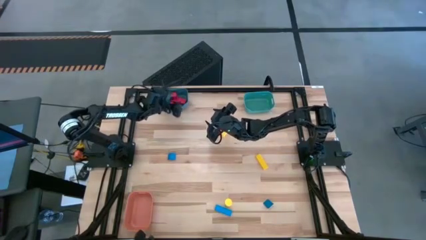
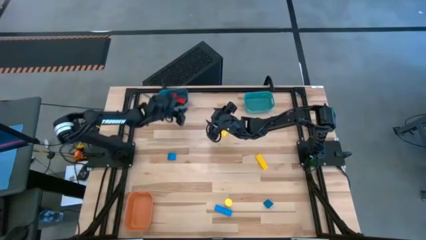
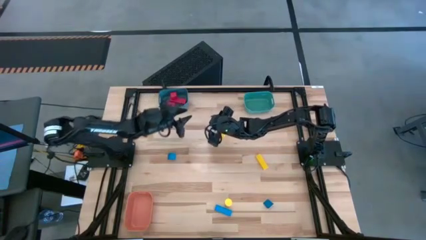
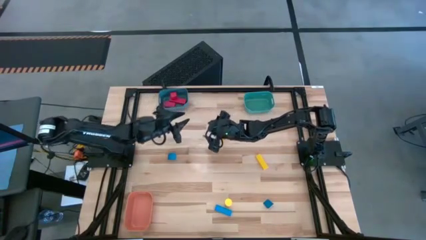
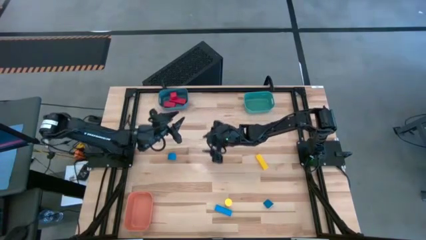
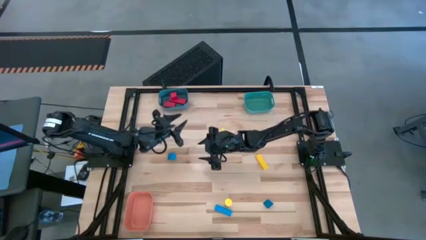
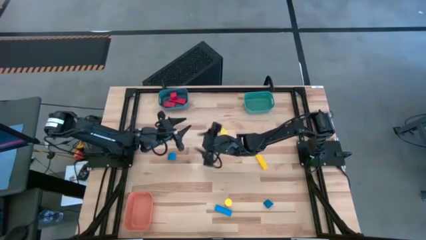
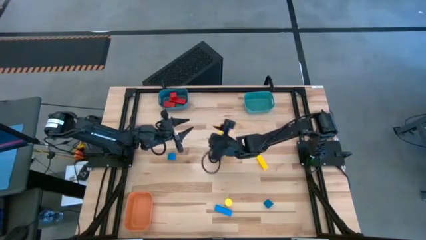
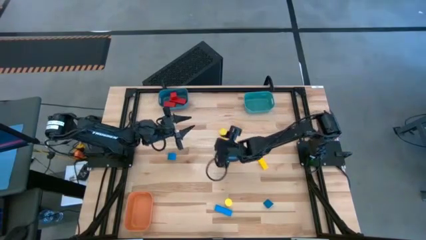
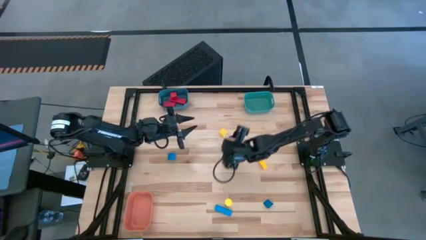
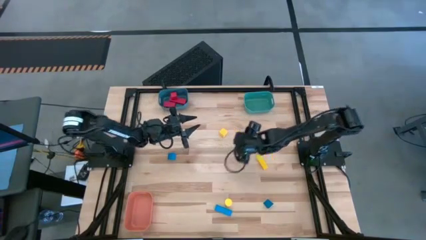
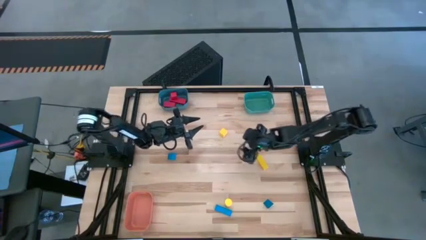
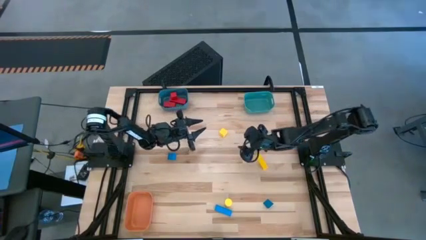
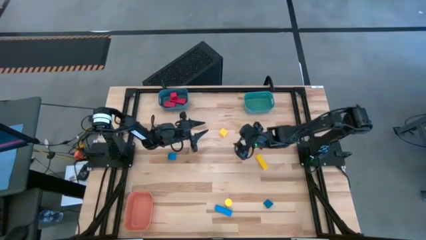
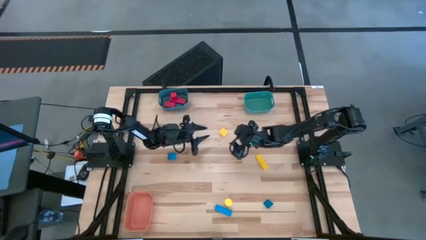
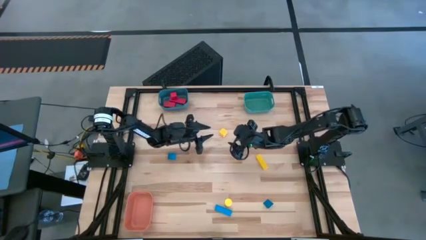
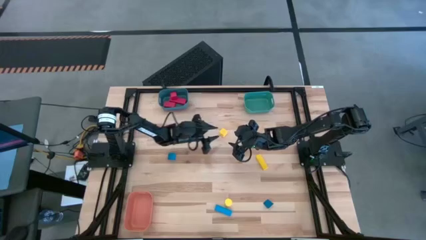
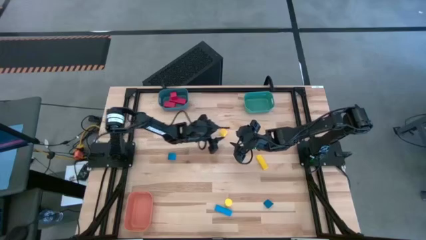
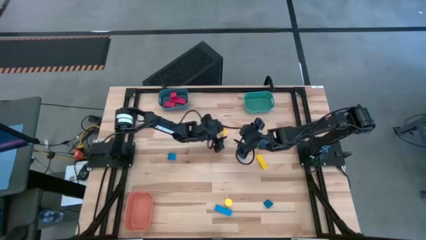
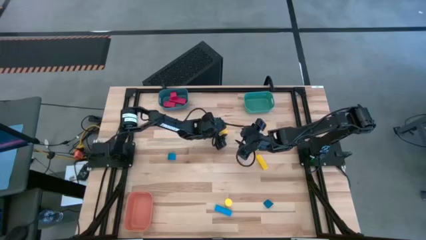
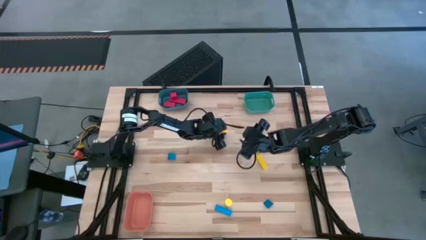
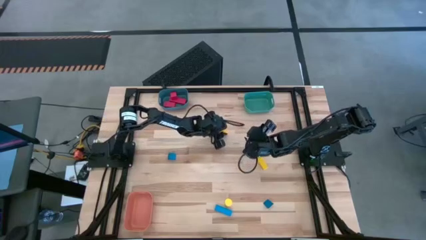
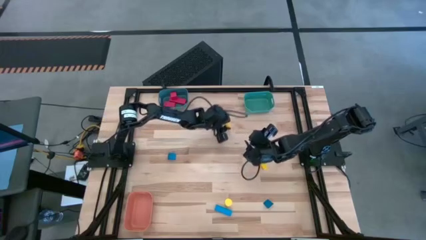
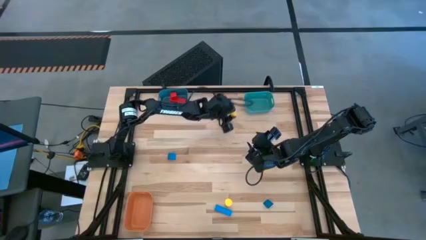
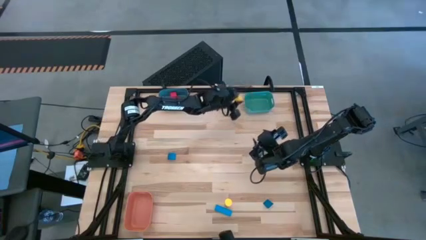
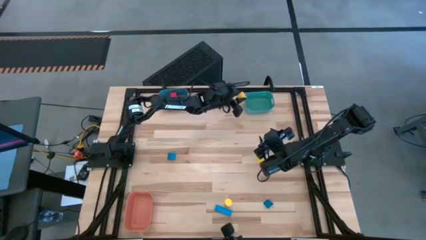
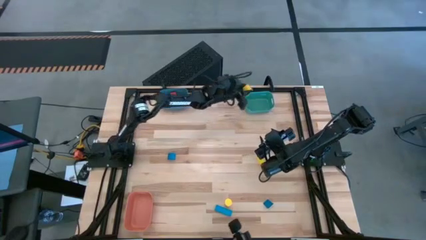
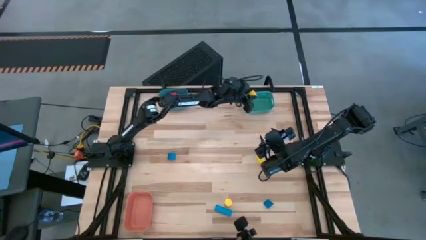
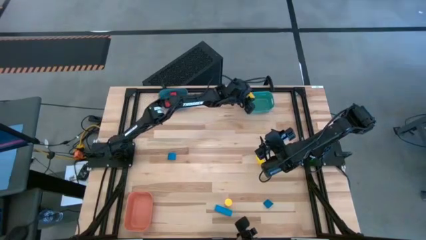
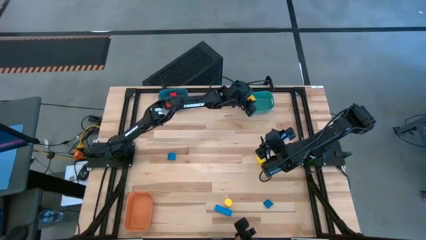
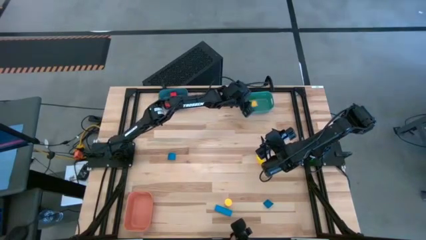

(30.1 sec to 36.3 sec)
Task: Sort & place blocks by color
Put the top yellow block into the green bin

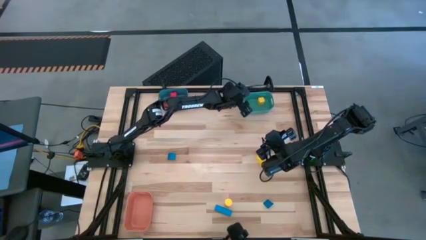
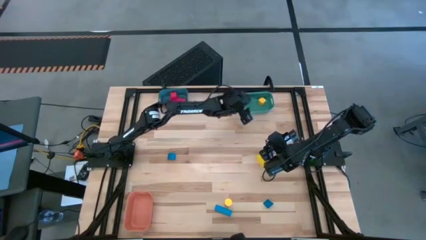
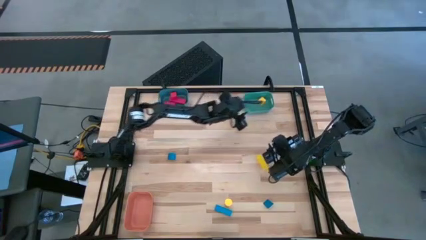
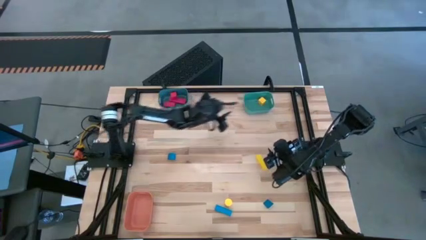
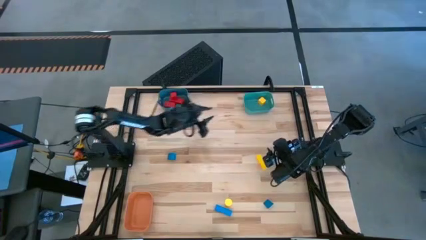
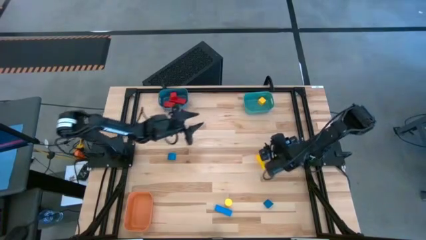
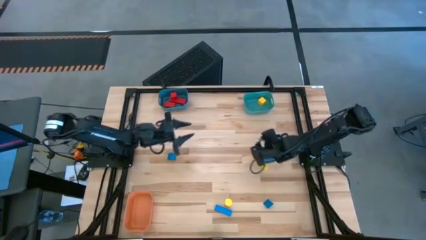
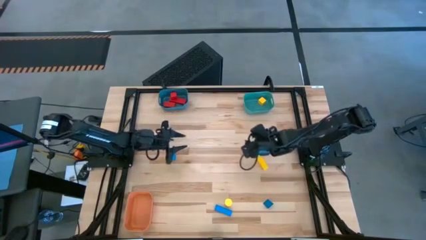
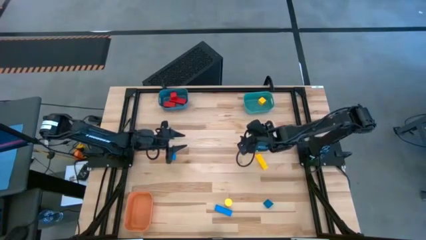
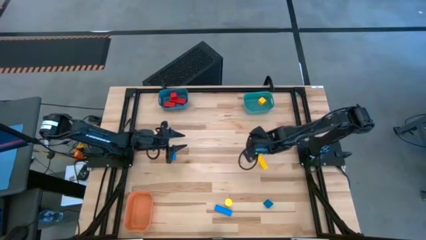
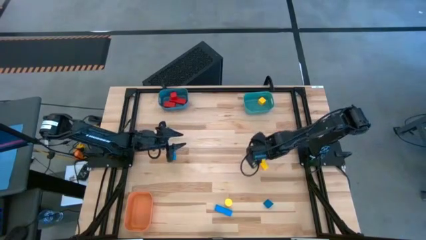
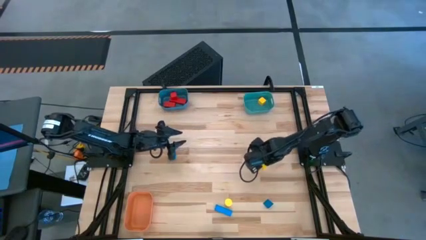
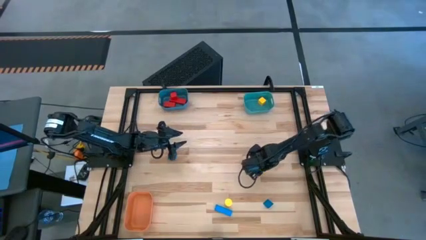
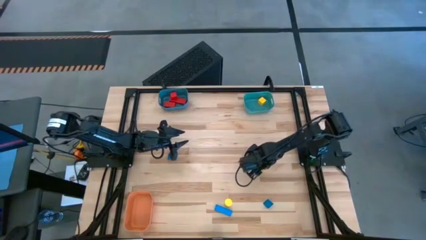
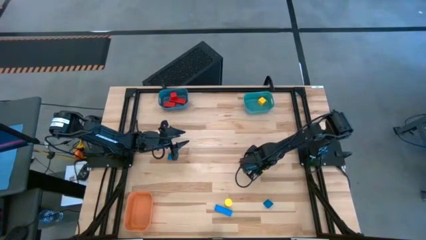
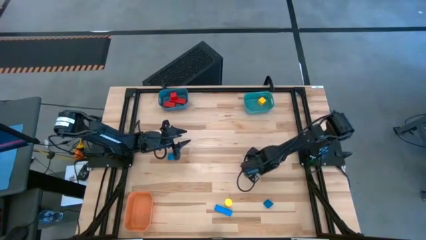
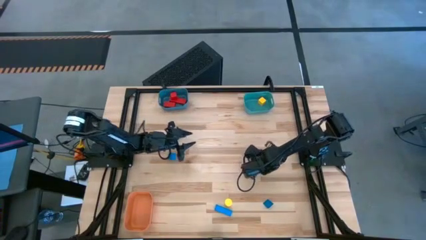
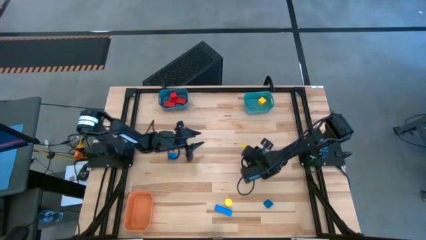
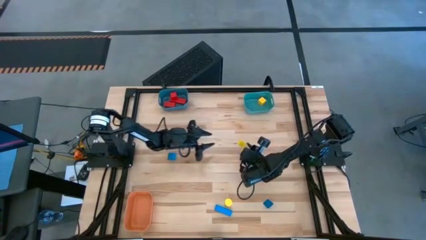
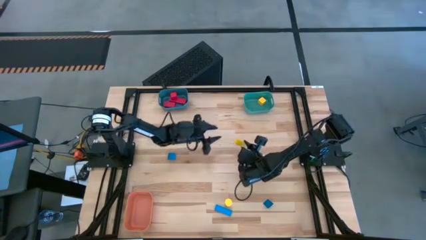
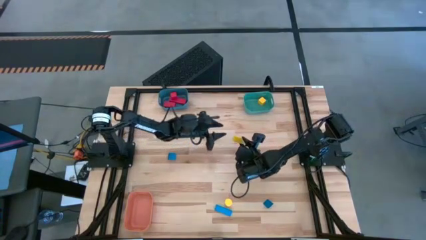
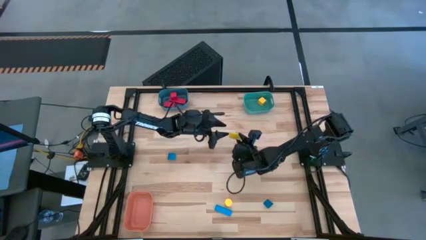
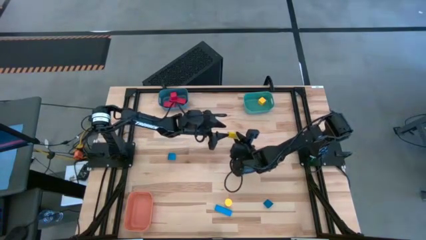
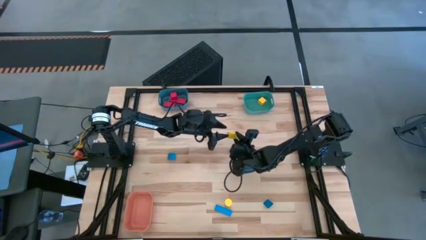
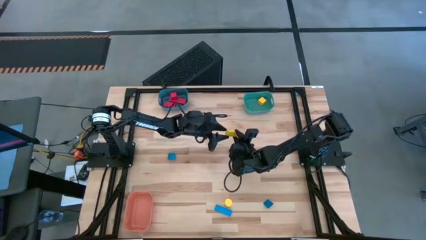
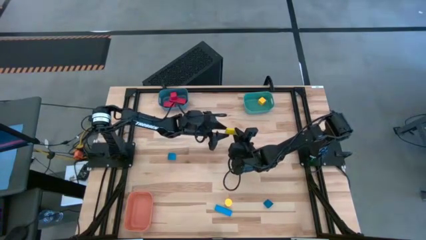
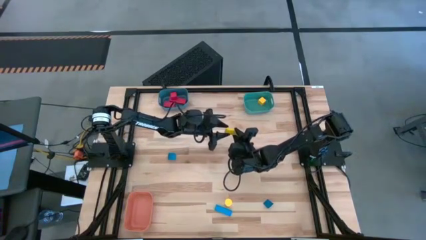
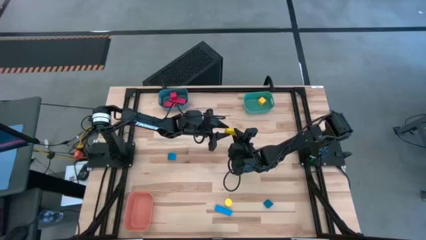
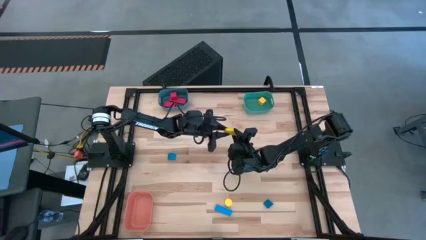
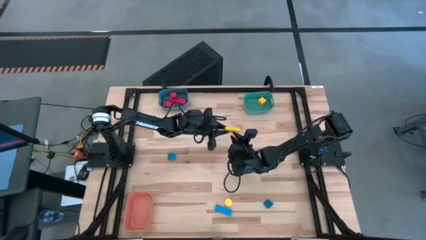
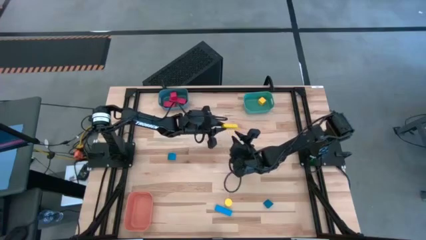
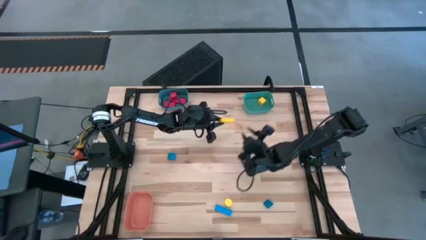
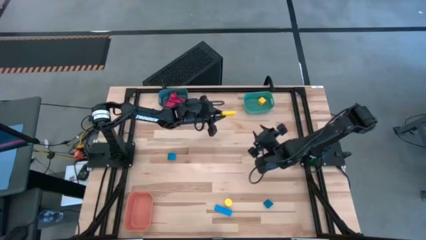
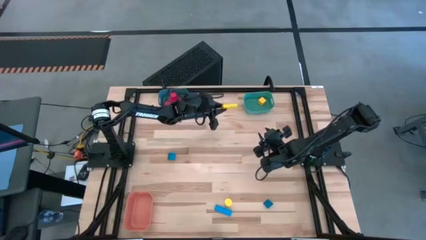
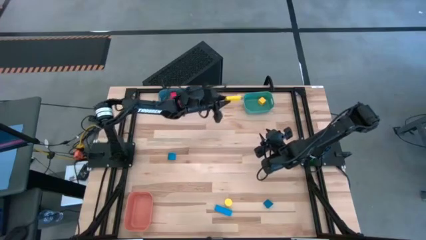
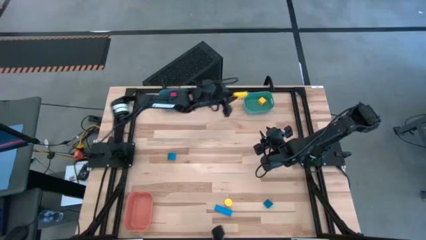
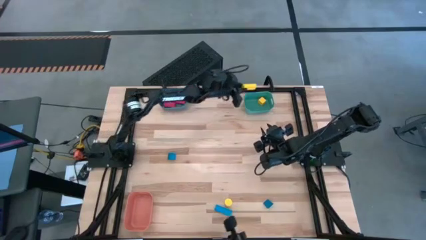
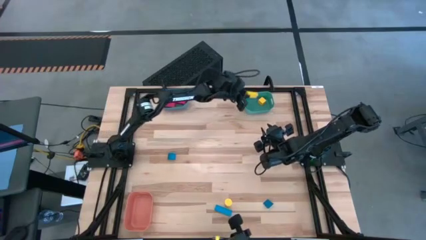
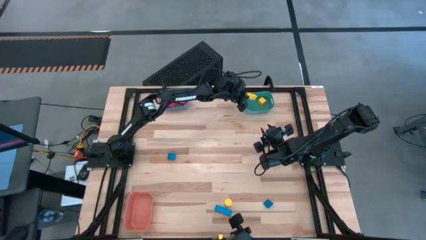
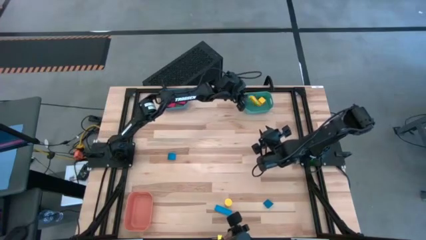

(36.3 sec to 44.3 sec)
Put the top yellow block into the green bin
